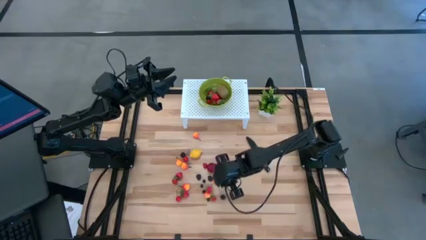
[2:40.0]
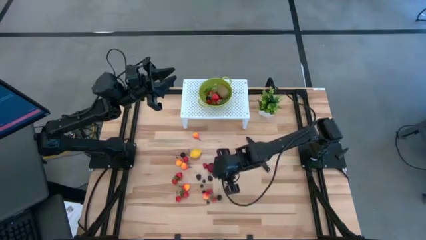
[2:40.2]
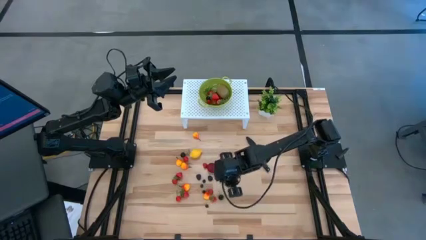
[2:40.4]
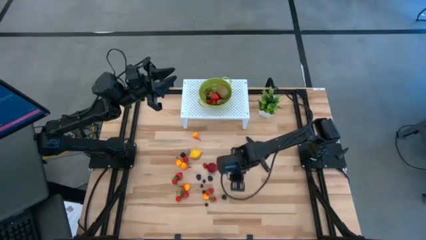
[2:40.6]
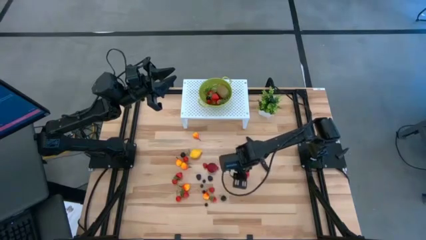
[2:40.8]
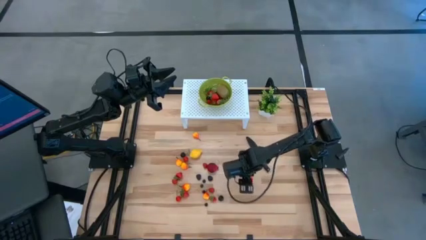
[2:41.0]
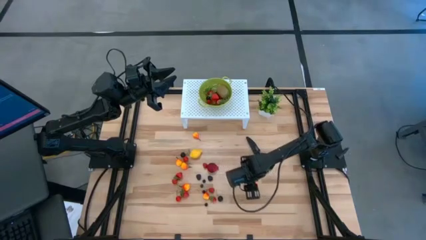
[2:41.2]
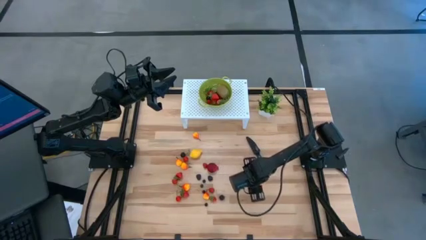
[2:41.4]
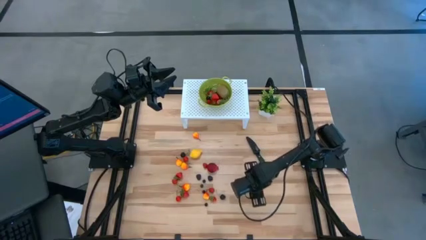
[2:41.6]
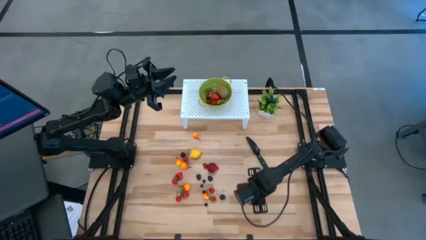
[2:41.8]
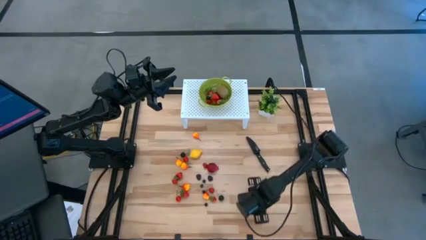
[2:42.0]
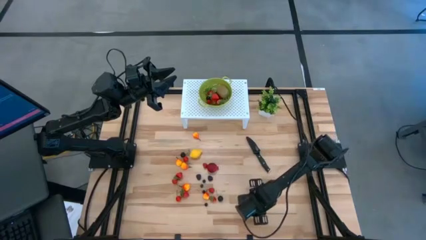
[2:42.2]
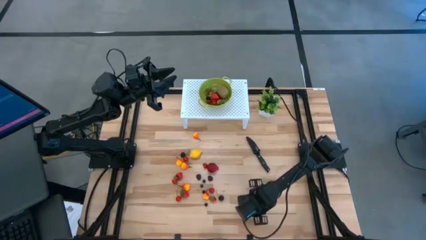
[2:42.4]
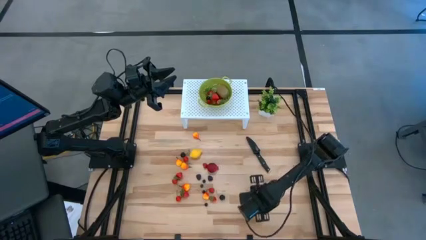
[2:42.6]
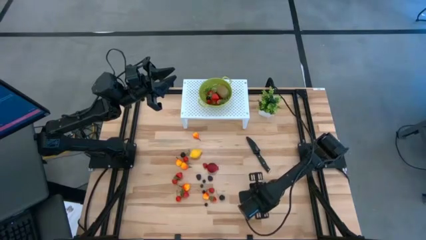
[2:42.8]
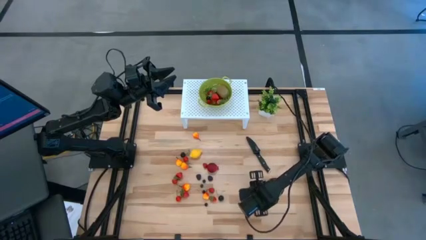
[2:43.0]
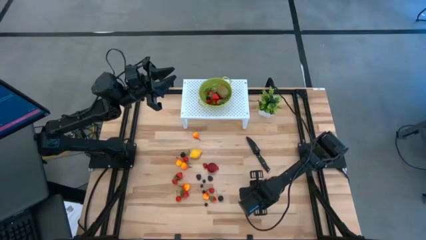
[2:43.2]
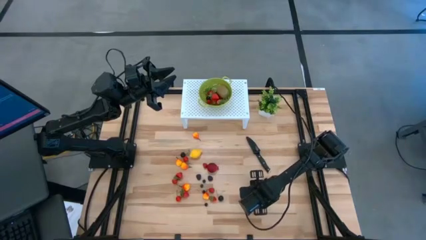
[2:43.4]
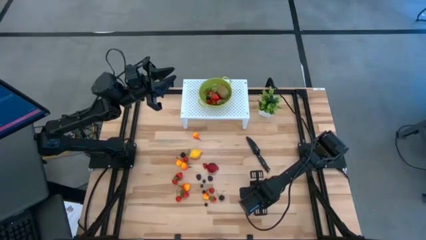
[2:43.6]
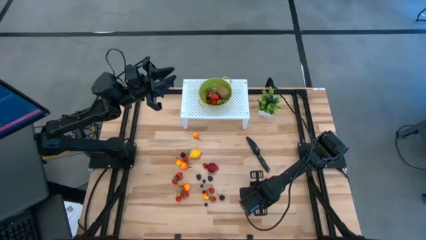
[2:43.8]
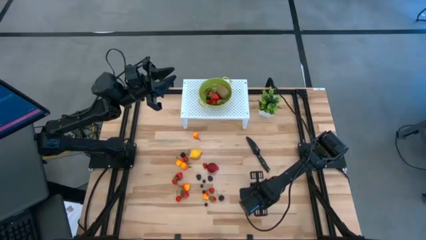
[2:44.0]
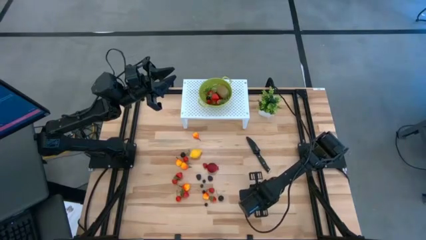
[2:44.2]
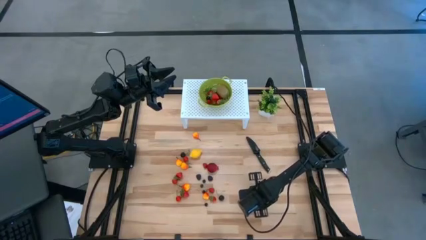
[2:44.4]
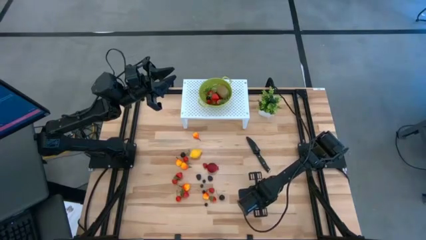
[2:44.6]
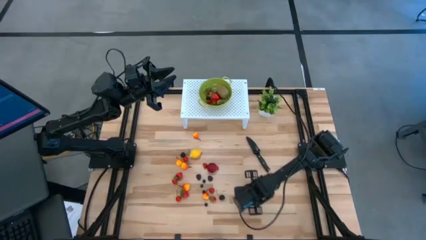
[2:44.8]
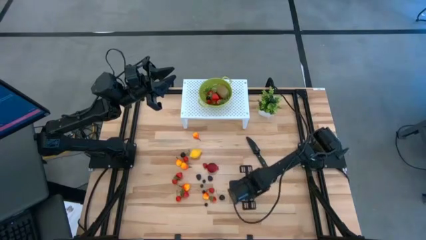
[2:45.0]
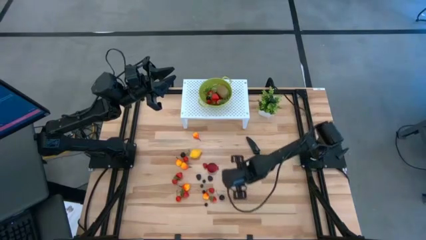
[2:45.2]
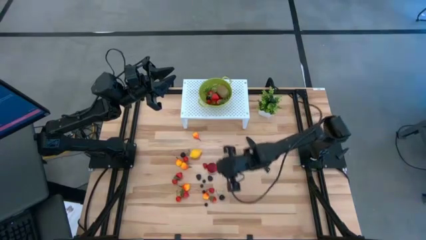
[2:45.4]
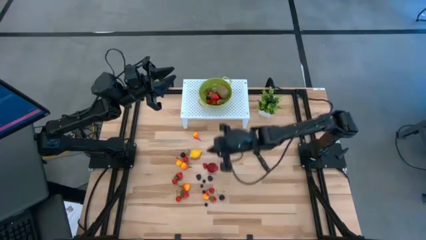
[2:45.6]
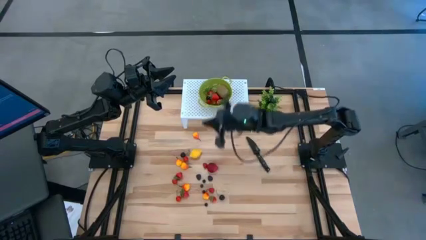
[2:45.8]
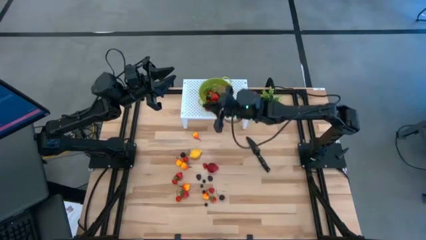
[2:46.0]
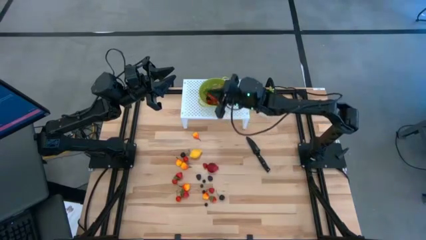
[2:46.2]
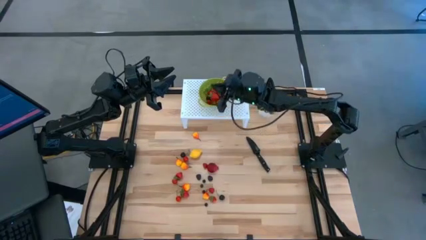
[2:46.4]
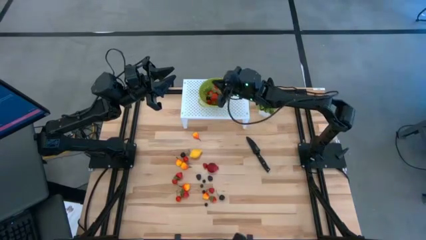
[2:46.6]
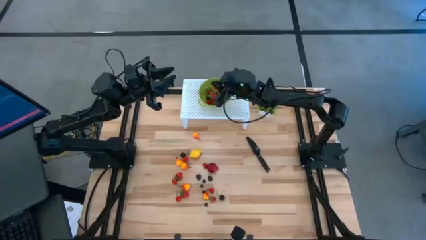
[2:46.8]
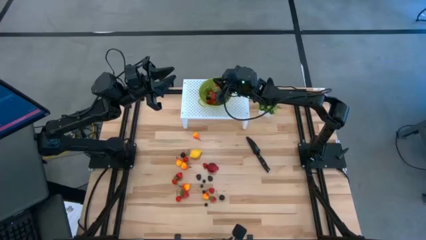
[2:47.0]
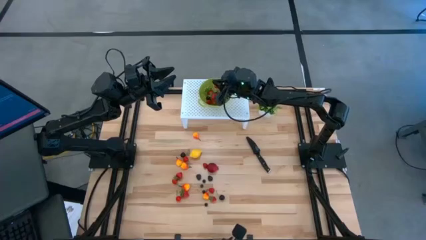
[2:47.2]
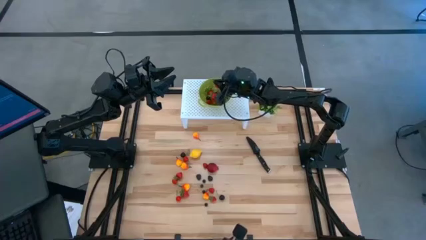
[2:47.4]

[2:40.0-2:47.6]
Task: Pick & Place Fruit
Put the red cherry into the green strainer bowl

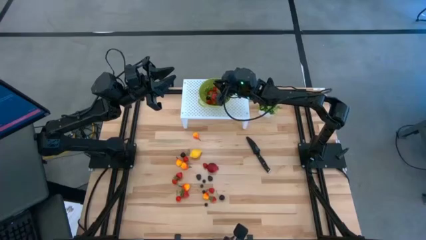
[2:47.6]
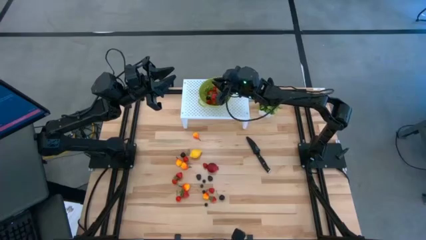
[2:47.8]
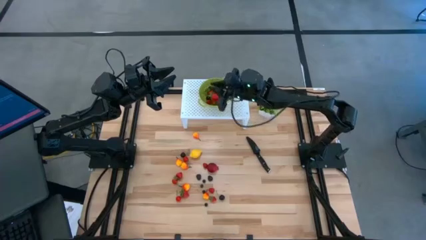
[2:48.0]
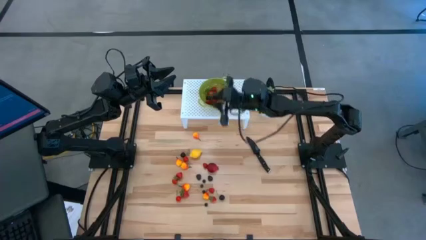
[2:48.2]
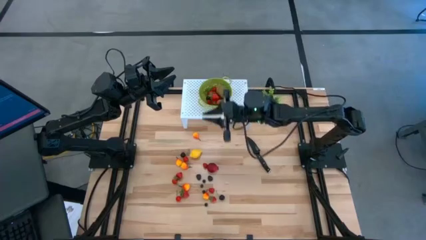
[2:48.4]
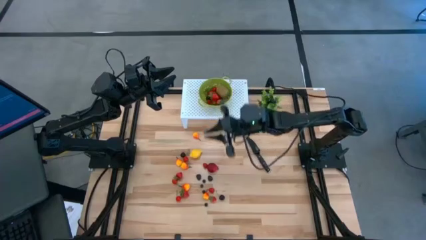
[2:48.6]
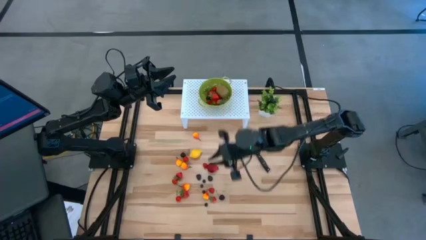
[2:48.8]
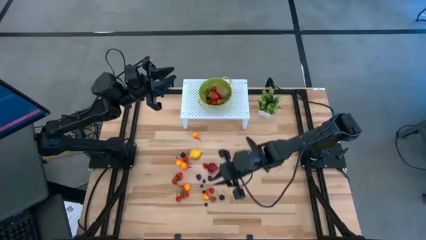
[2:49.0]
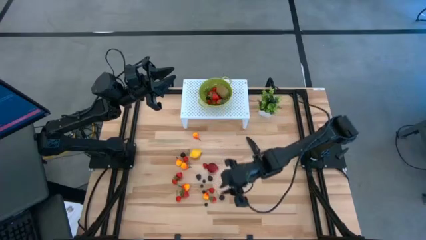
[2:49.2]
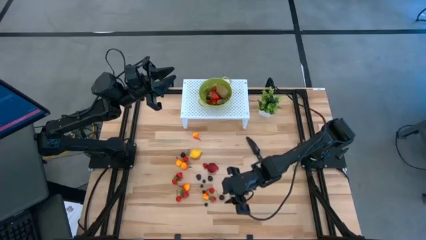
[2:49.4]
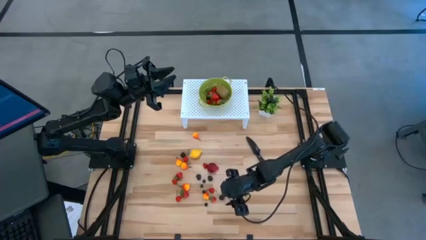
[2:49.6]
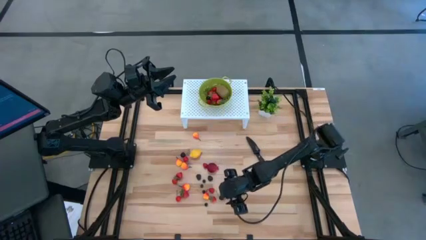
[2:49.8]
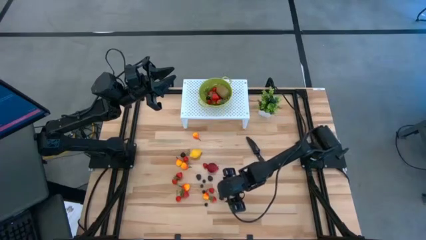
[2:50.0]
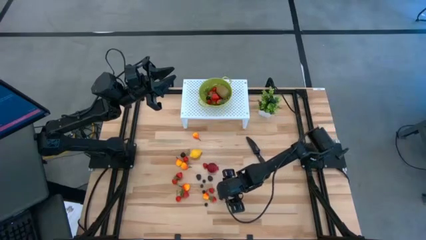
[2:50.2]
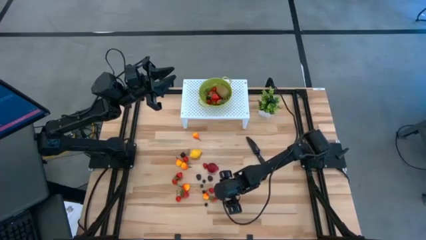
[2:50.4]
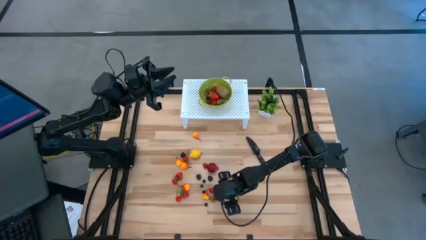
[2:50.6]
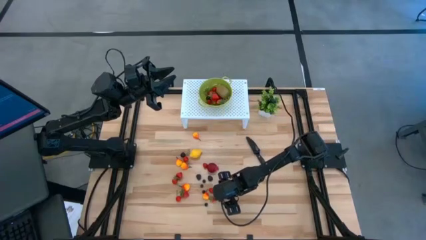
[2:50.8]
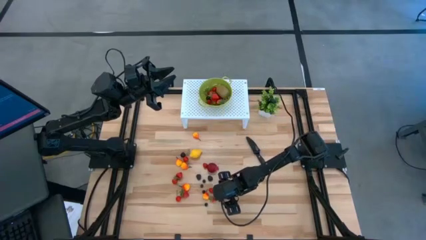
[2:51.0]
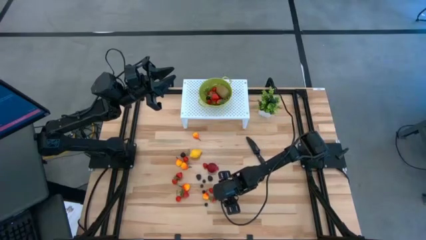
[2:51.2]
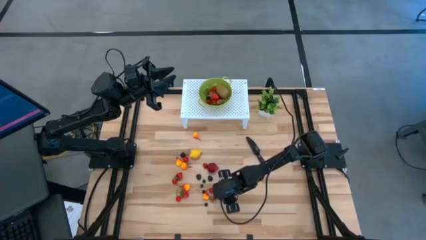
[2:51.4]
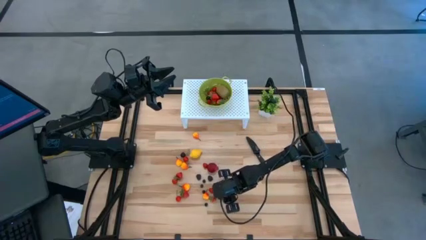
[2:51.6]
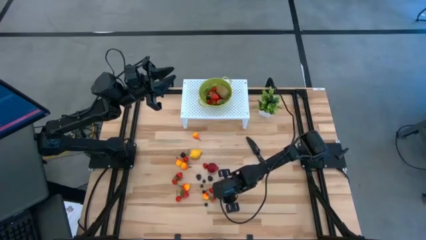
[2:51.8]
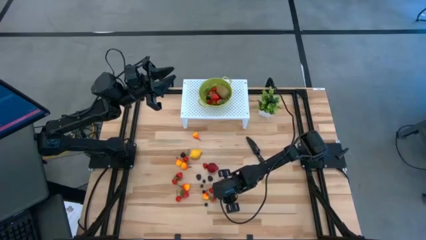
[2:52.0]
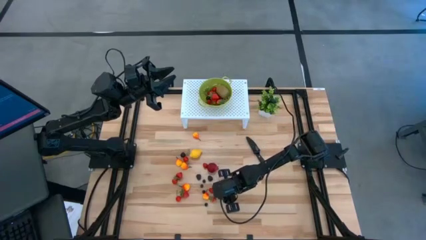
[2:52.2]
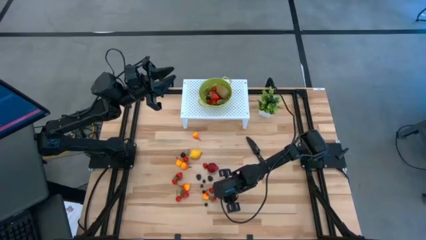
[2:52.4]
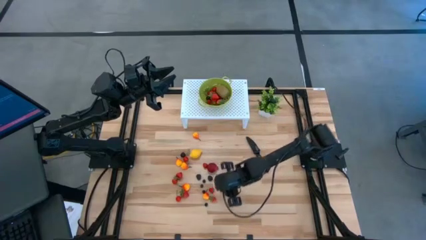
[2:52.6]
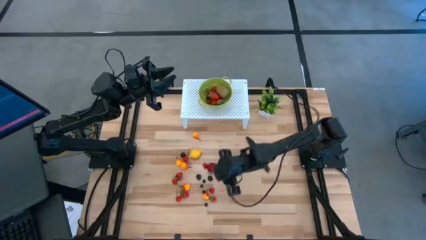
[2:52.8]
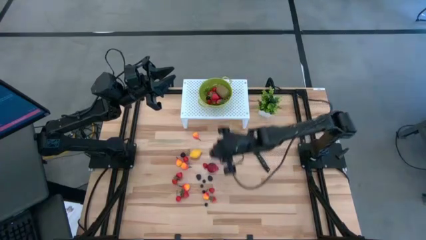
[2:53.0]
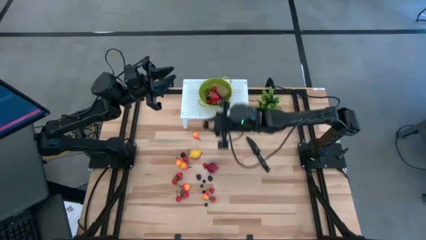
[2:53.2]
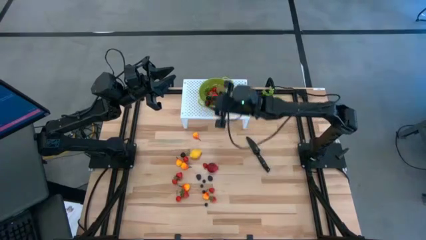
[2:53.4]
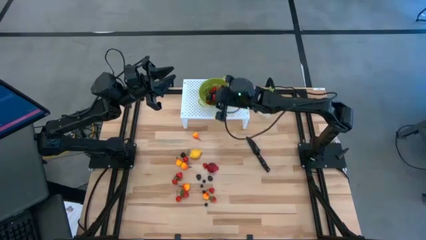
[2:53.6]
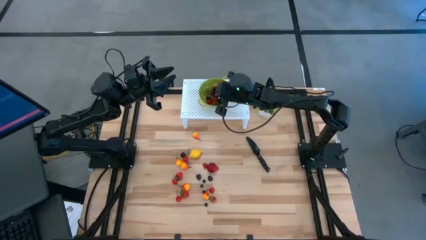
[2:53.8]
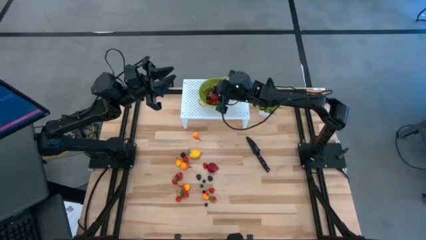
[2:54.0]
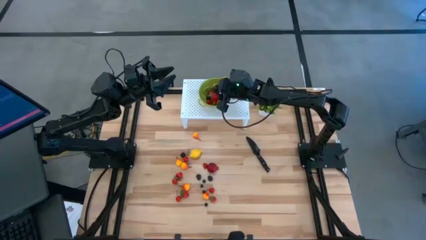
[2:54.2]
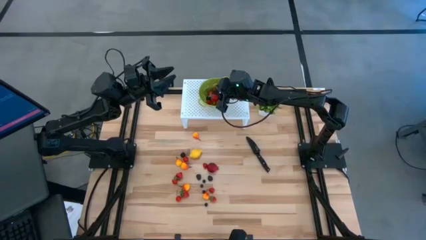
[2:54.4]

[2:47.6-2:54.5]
Put the black cherry into the green strainer bowl

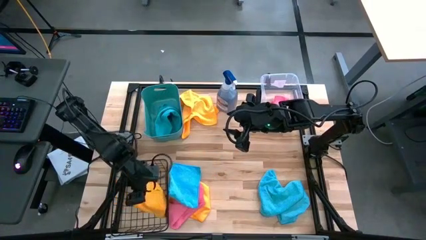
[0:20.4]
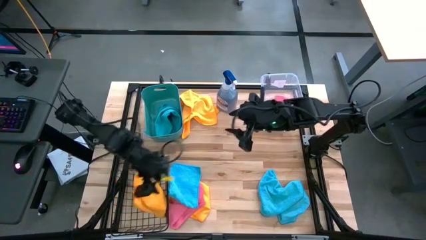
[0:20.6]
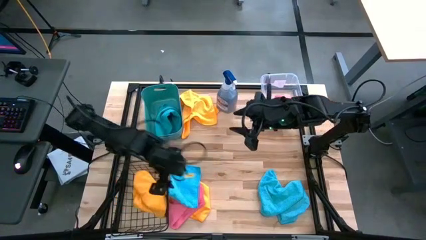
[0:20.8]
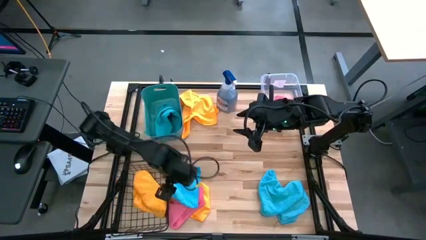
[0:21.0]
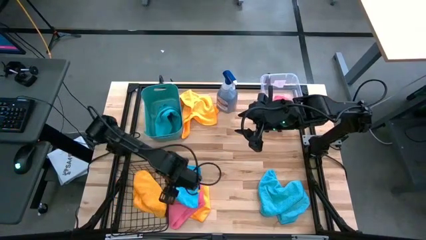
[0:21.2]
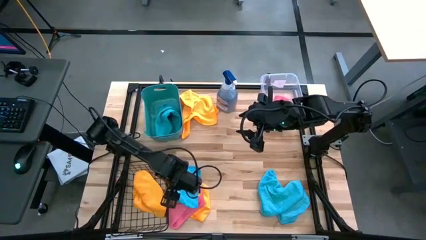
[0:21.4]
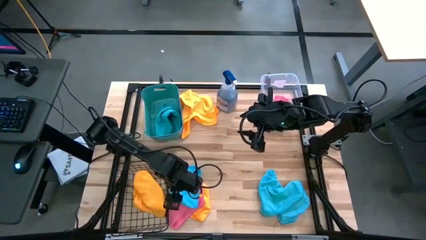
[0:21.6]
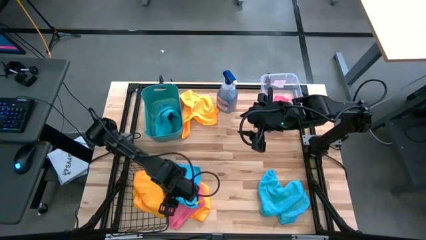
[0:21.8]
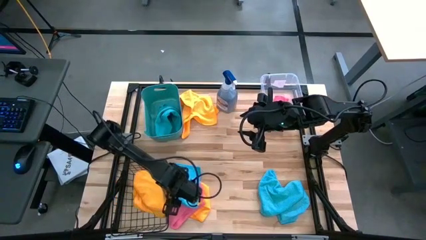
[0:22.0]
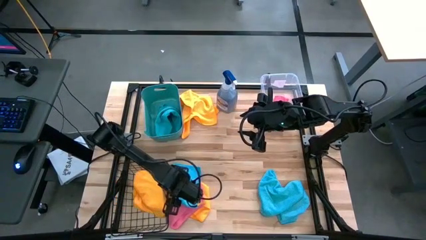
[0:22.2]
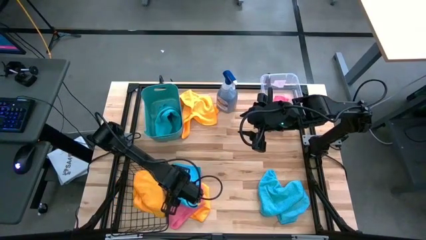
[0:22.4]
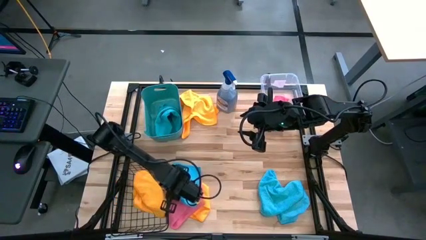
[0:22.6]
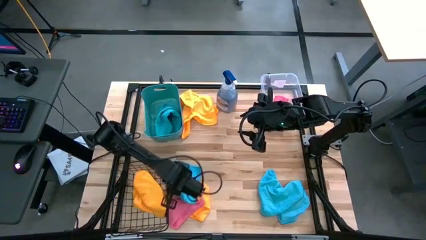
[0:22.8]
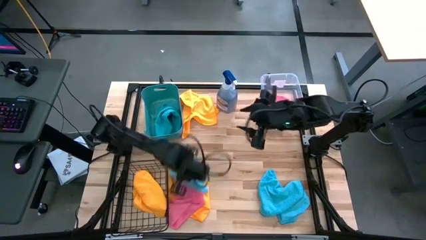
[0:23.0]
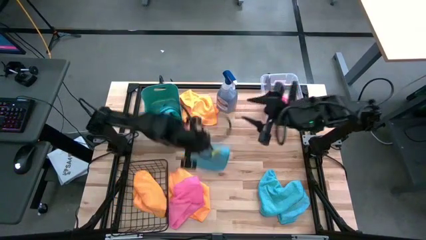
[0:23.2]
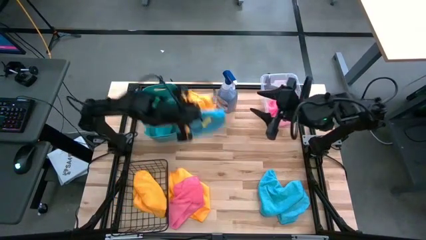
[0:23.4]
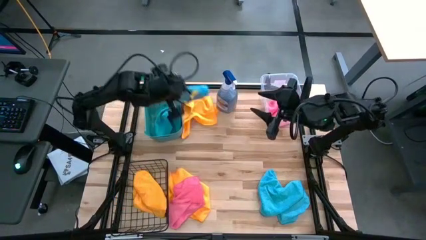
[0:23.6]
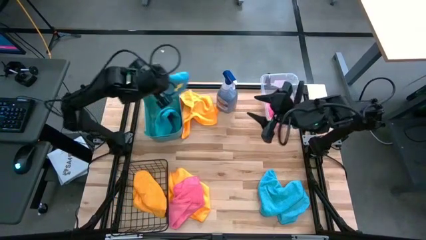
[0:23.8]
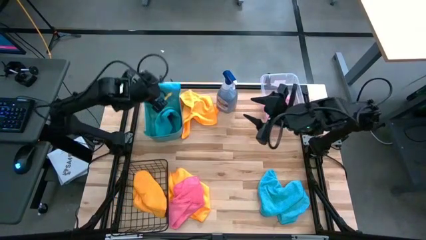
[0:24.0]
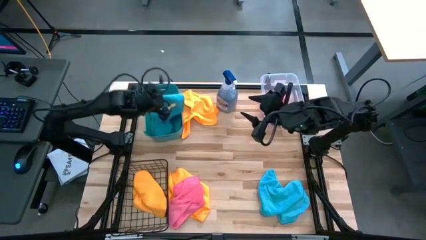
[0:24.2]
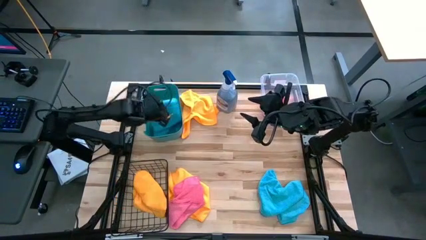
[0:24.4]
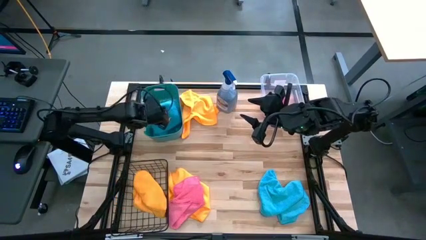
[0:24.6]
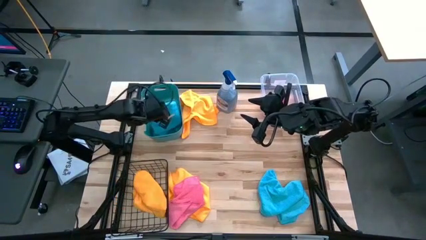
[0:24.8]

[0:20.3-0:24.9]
Task: Sort microfiber towel by color & place in baskets
Put the left blue towel in the green bin
